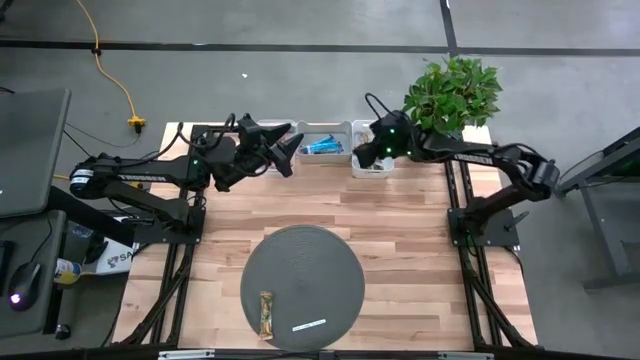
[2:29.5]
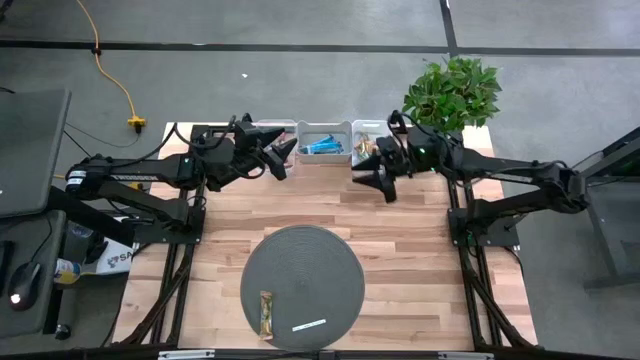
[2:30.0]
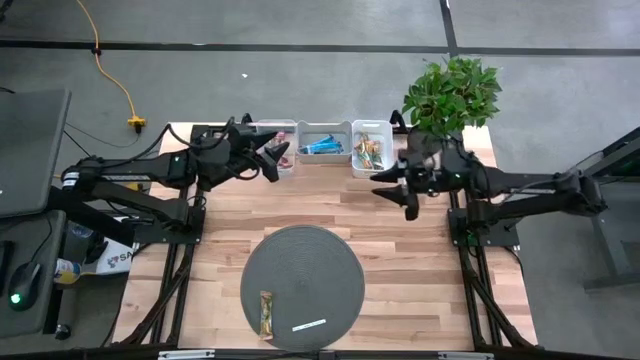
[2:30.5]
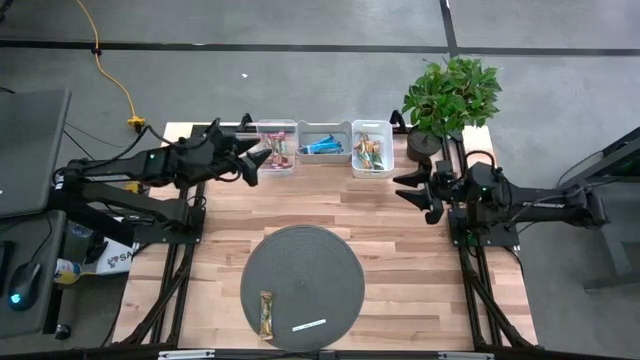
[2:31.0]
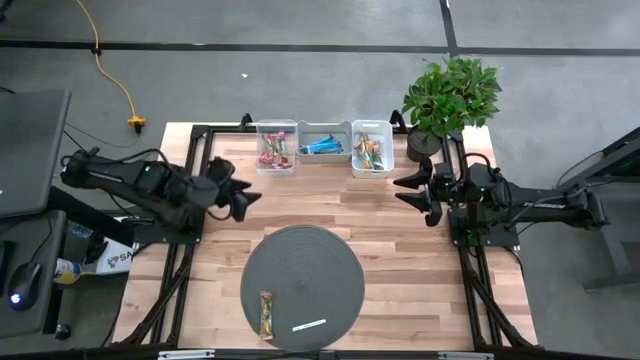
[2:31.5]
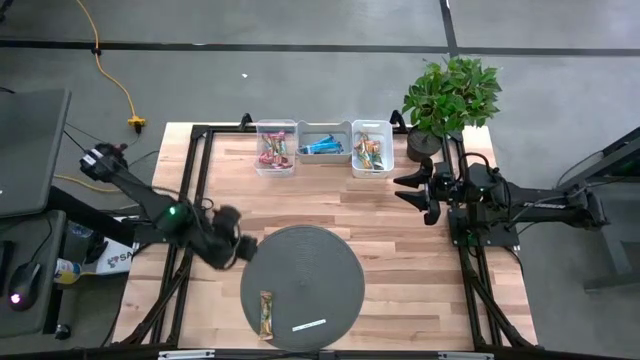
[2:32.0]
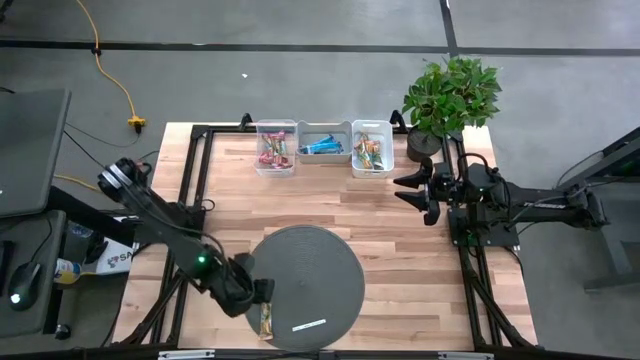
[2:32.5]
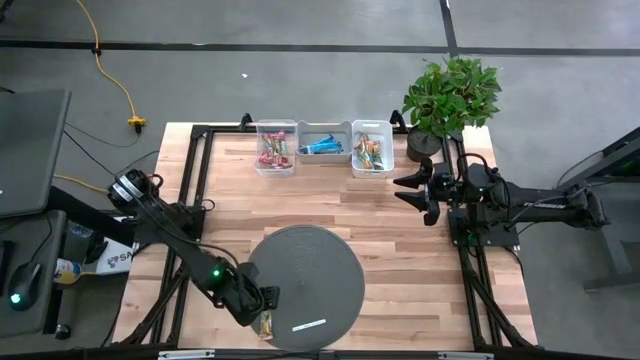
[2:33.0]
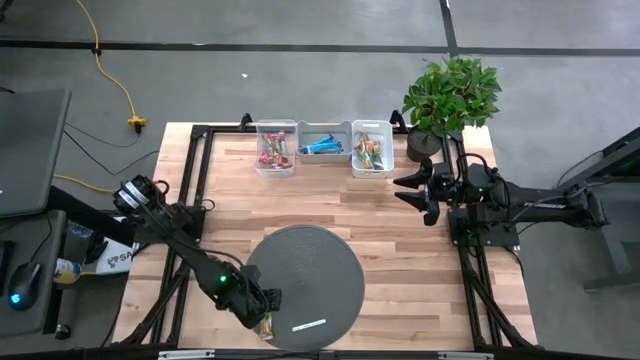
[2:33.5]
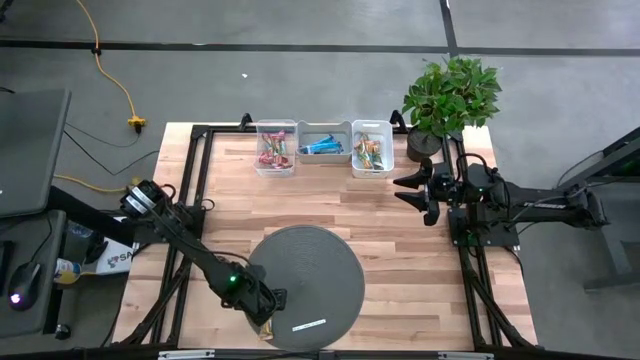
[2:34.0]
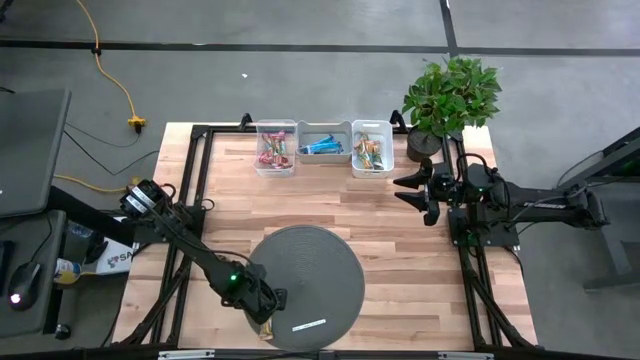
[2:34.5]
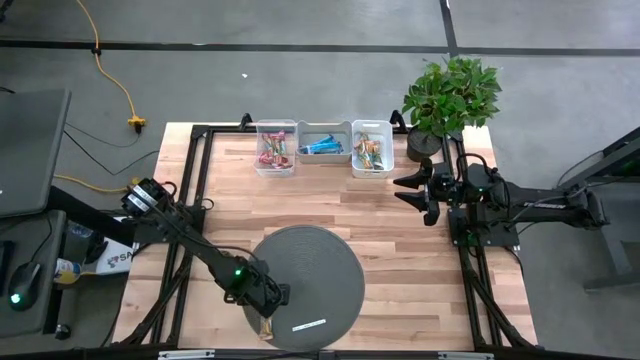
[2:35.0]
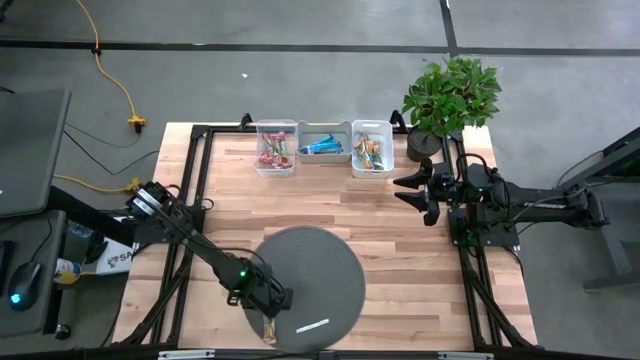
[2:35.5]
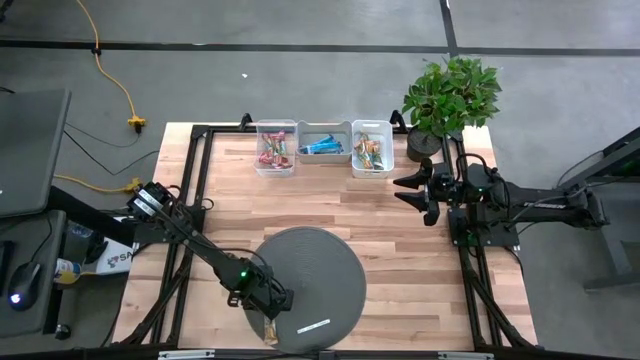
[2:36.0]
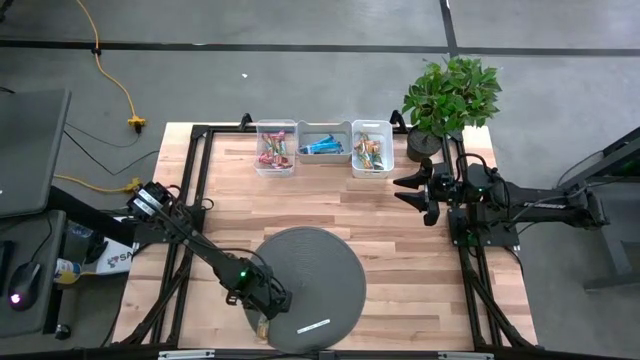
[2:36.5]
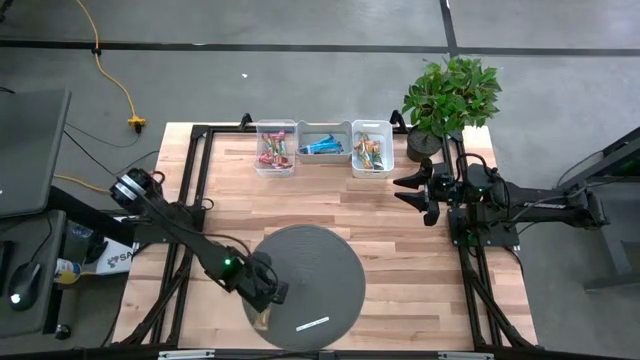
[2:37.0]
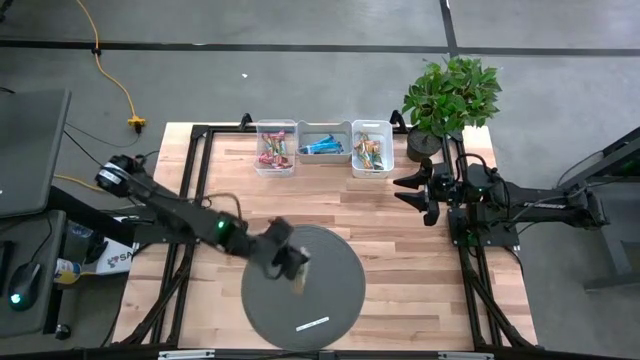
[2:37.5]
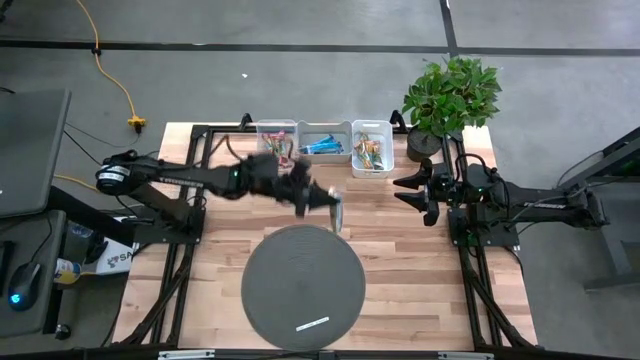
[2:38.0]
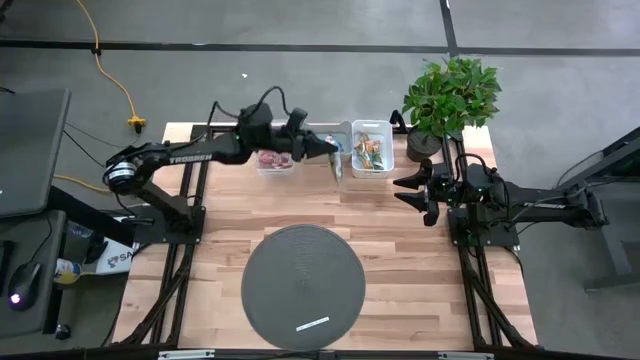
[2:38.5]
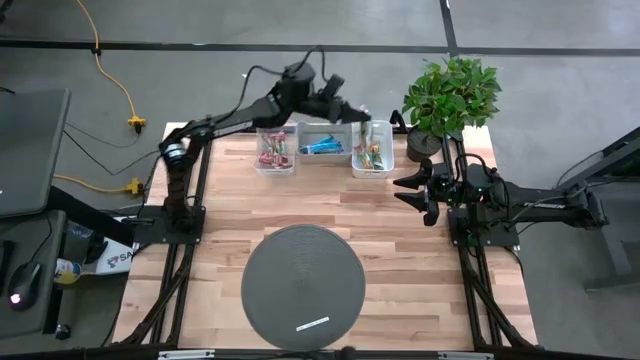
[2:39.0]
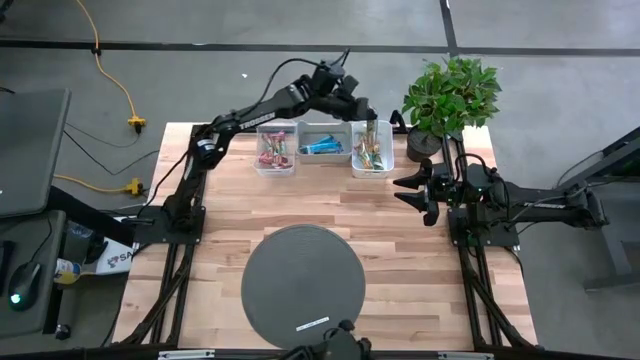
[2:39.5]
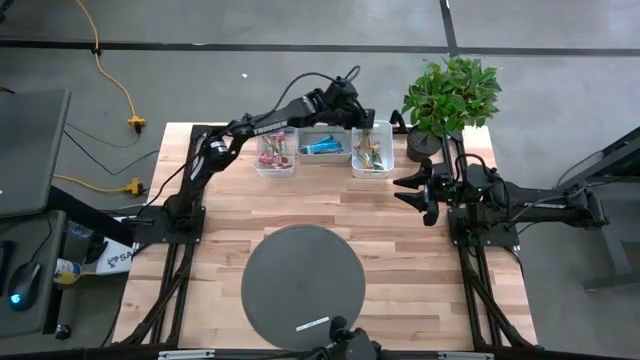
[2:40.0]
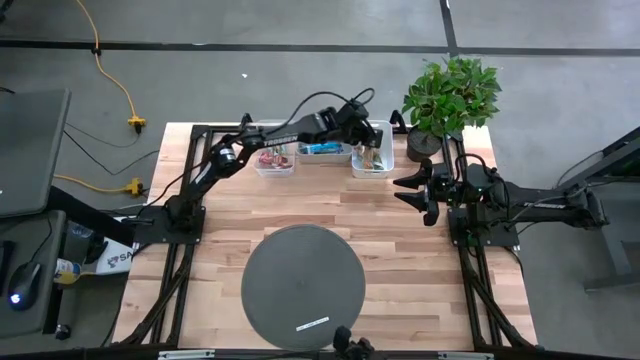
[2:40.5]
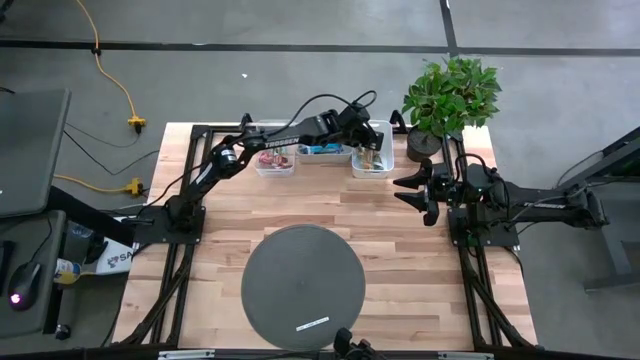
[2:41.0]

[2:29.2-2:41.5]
Task: Pick and place Granola Bars by type
Put the orange granola bar into the white bin

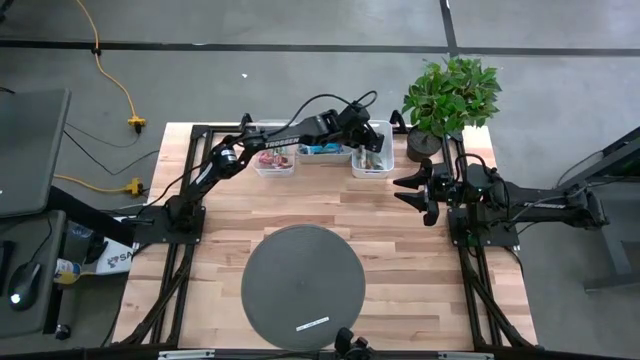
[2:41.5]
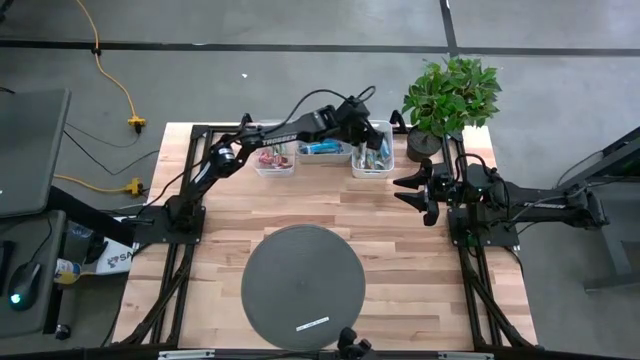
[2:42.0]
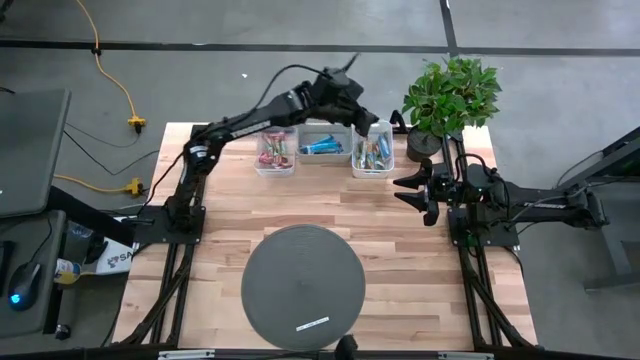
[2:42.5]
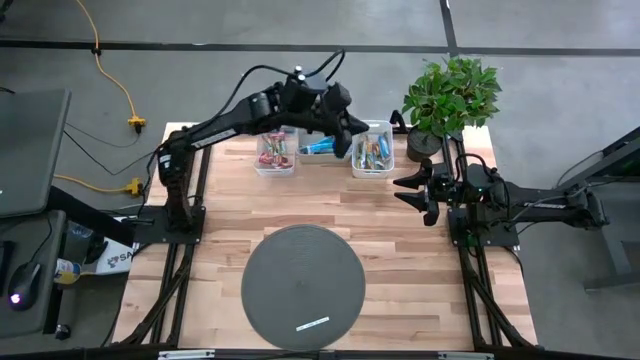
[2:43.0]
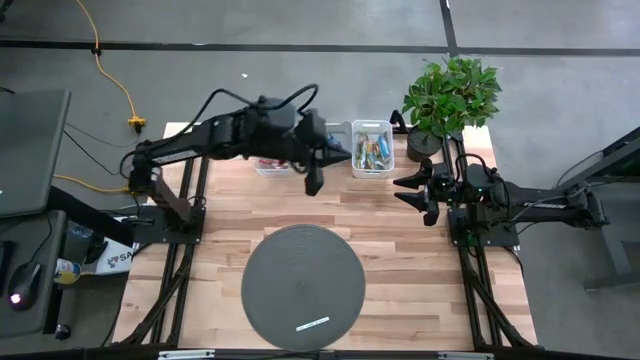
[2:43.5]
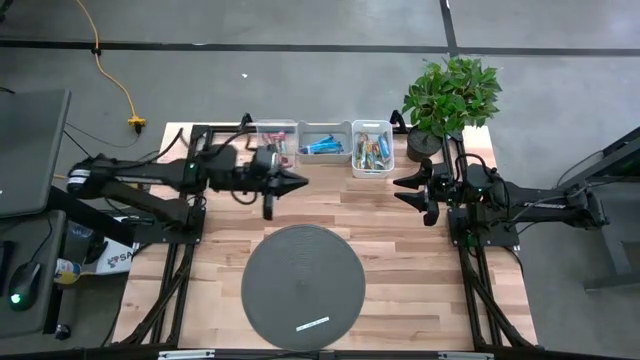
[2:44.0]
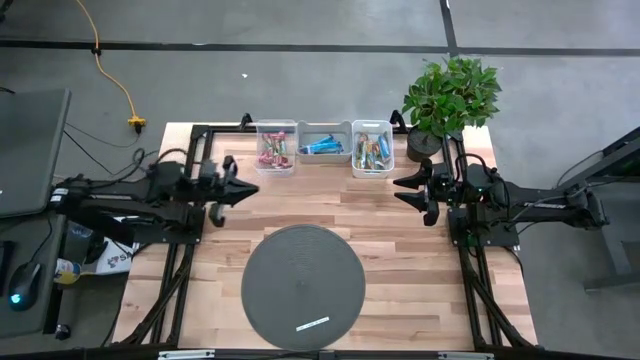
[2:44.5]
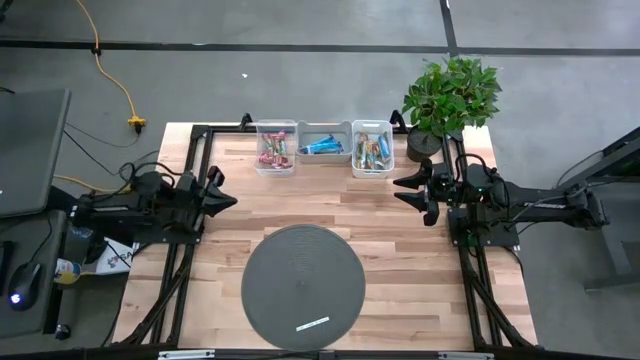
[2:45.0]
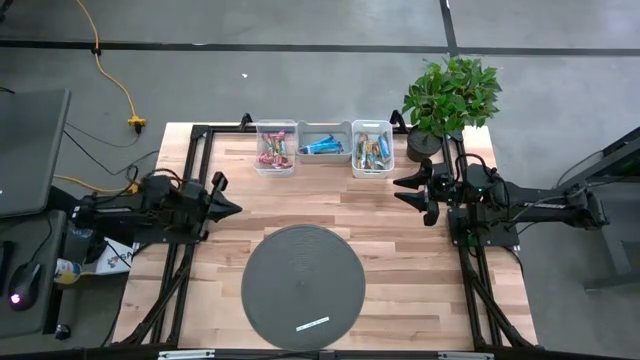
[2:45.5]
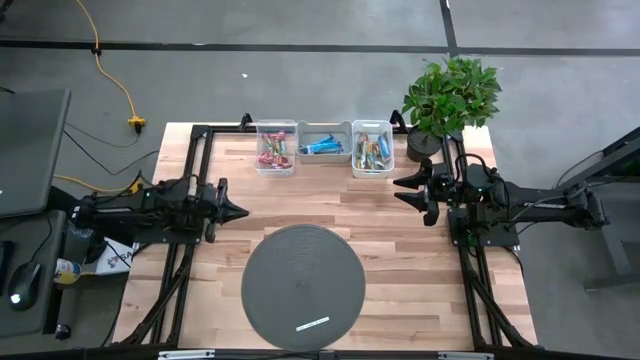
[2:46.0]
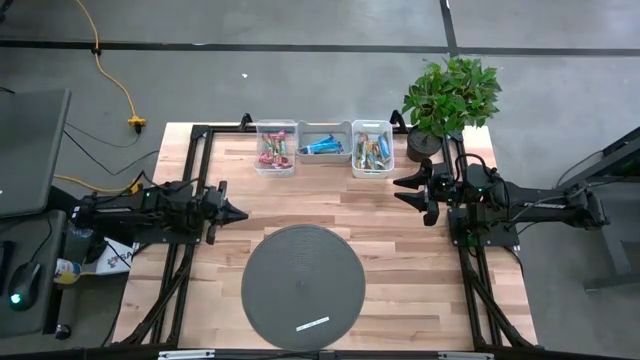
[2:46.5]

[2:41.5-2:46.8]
Return to Home Position

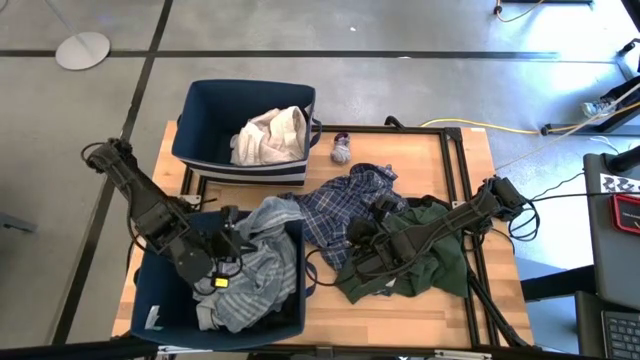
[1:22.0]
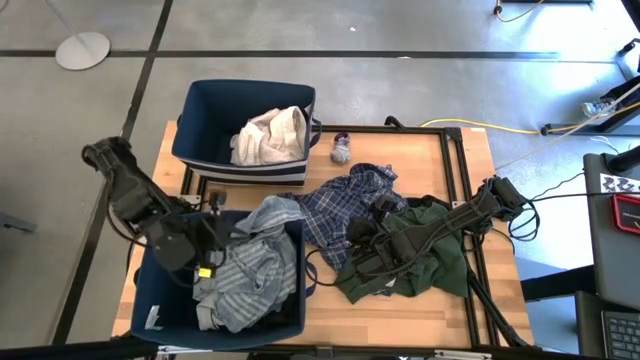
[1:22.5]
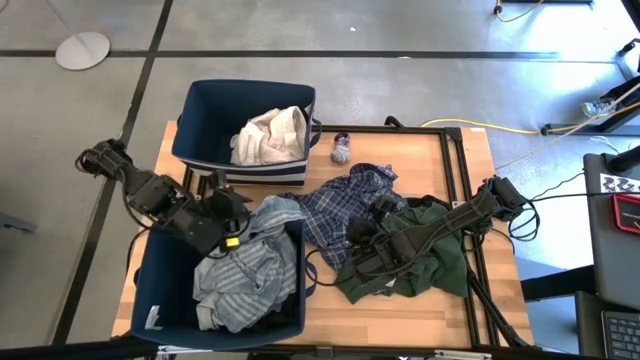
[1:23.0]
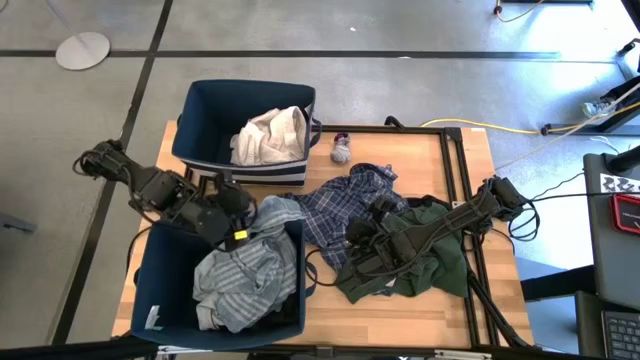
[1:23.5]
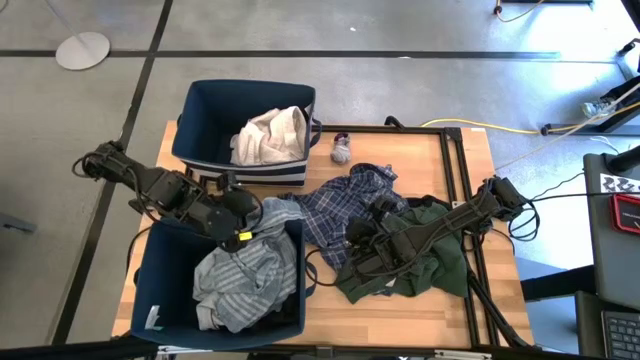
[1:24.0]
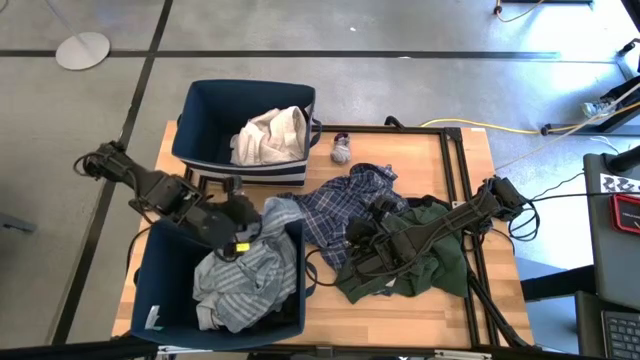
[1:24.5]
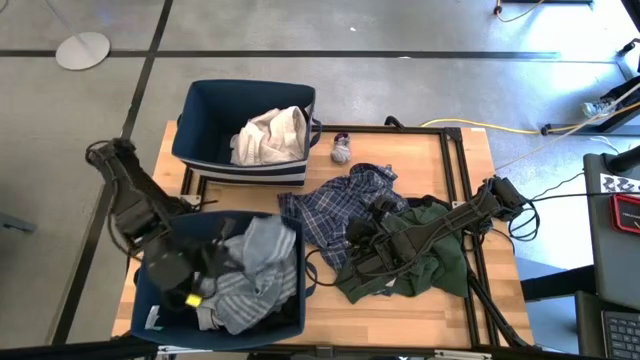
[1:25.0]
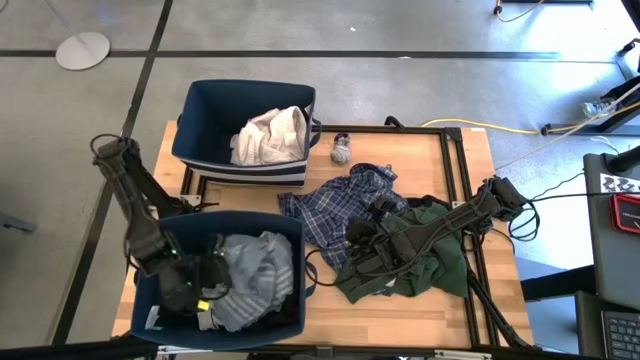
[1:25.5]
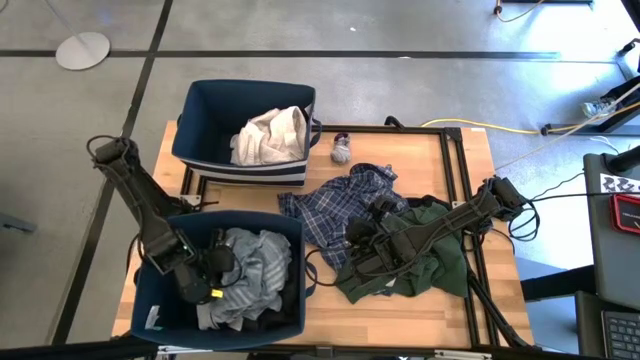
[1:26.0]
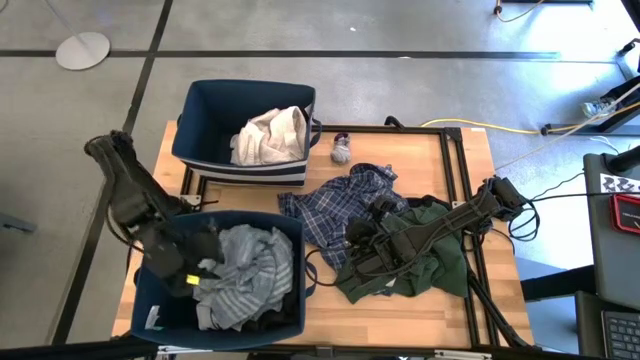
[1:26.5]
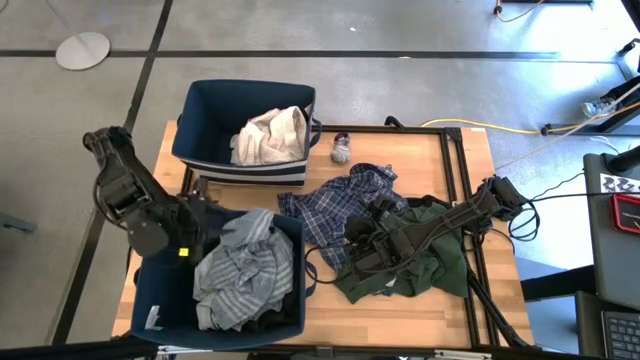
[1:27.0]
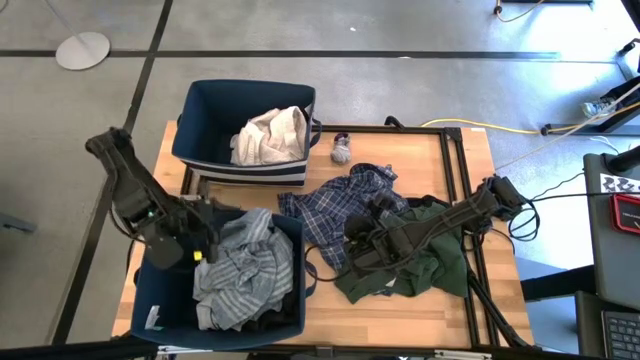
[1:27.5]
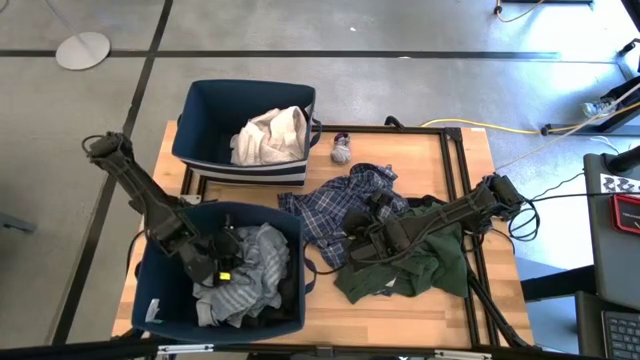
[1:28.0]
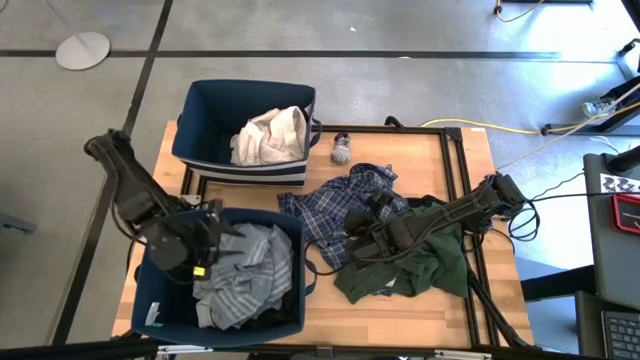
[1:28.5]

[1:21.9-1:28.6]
Task: Sort clothes
Put the light blue long sleeve into the bottom blue laundry organizer
